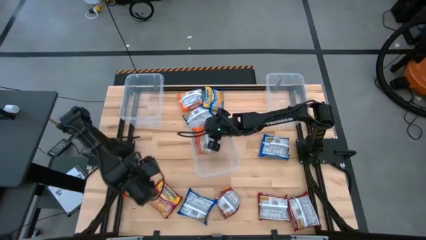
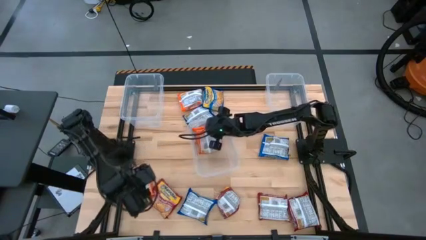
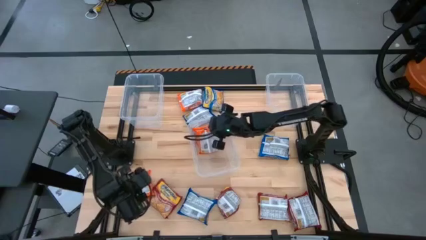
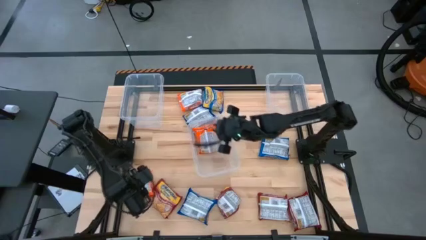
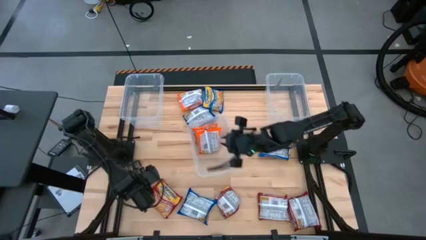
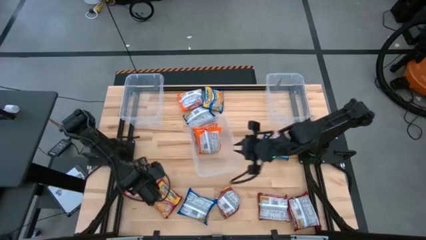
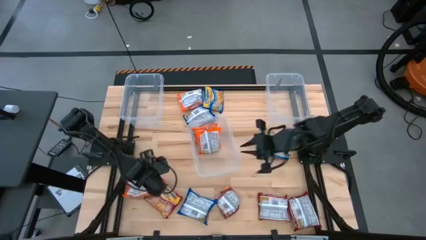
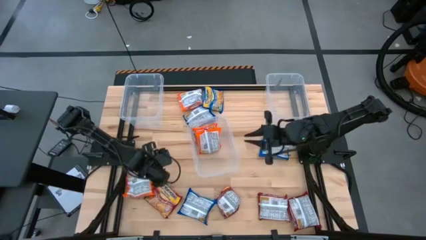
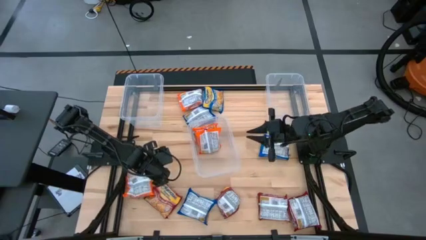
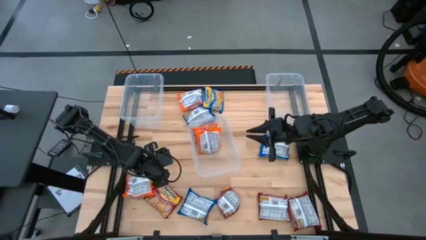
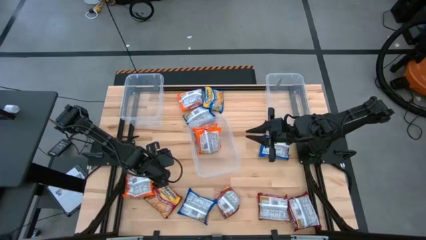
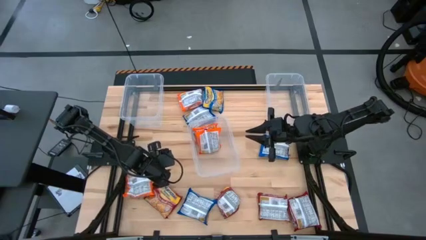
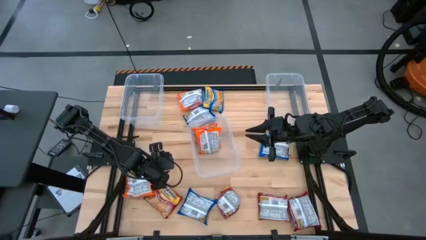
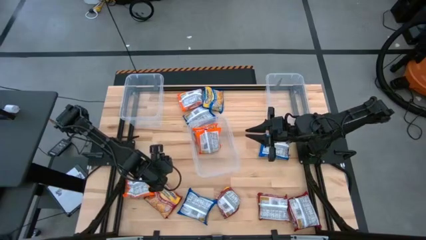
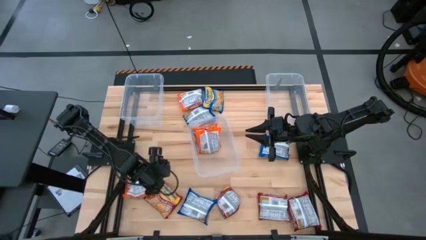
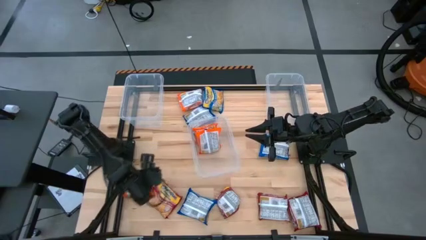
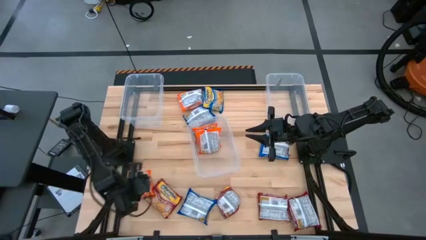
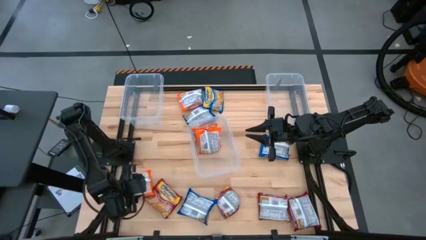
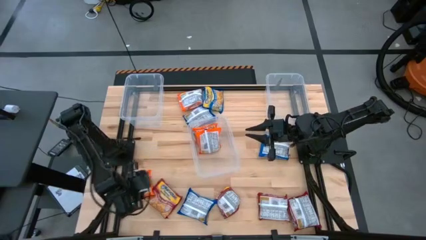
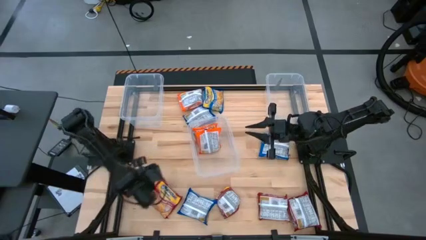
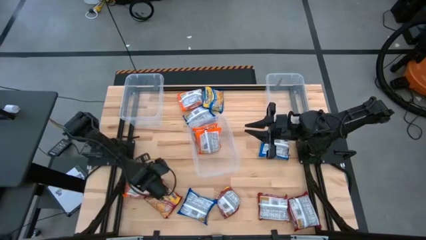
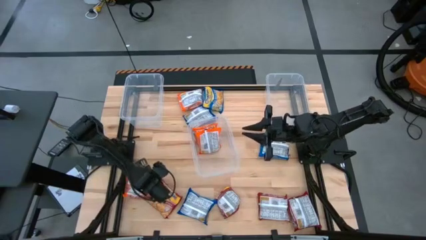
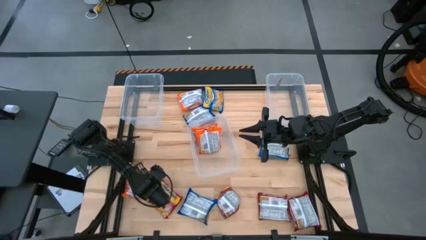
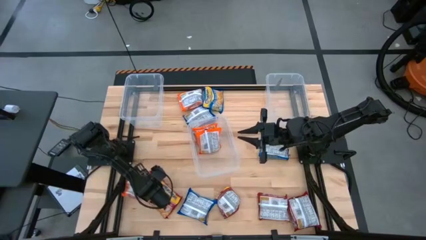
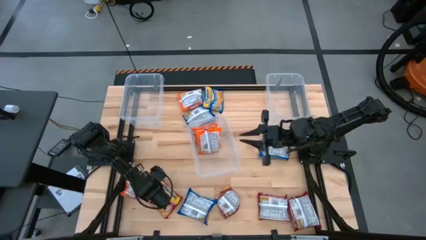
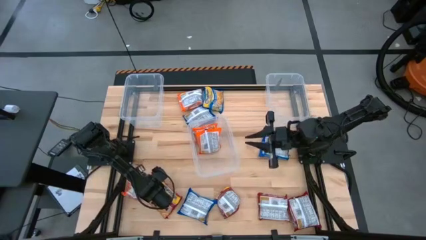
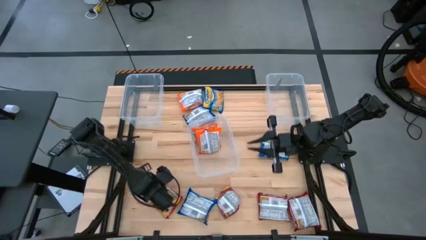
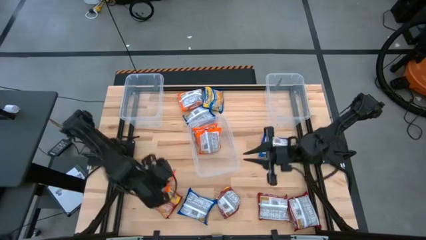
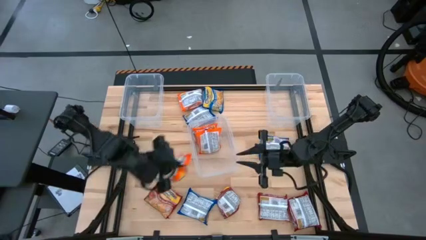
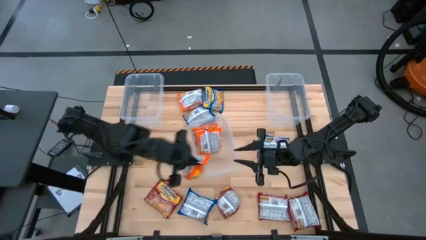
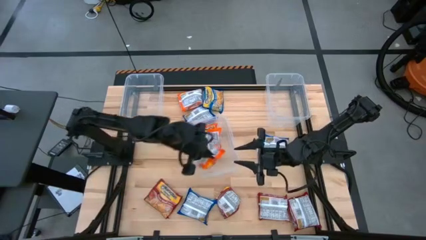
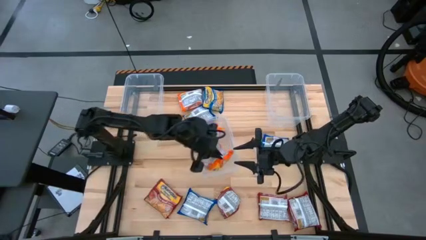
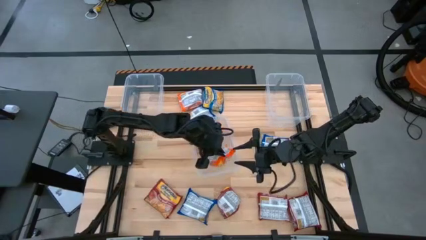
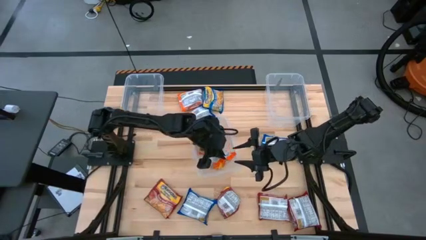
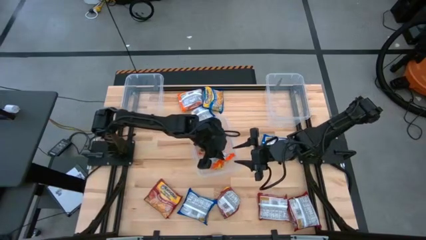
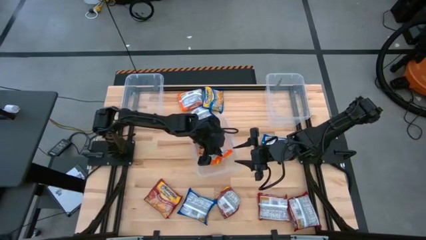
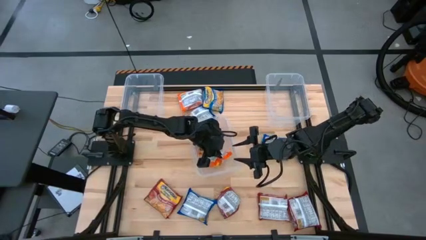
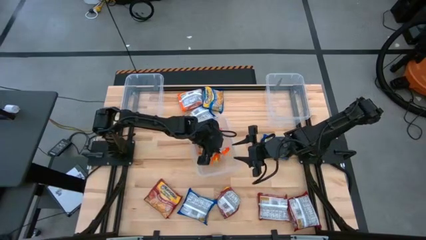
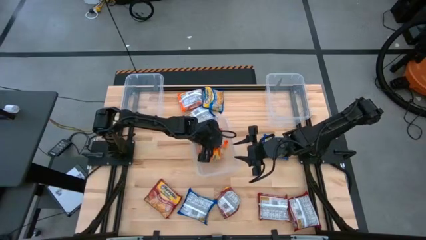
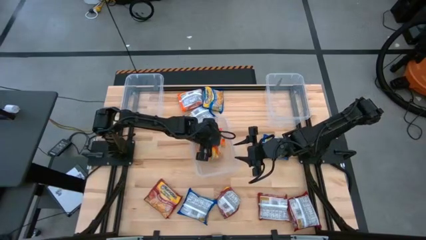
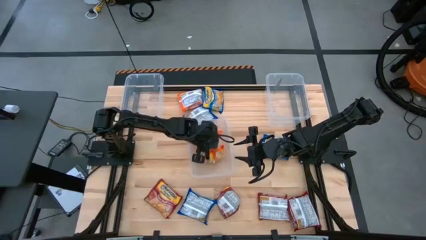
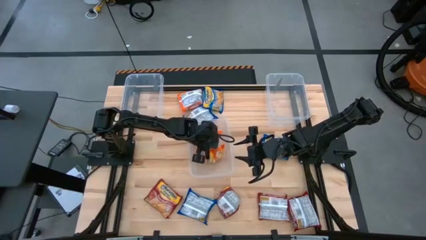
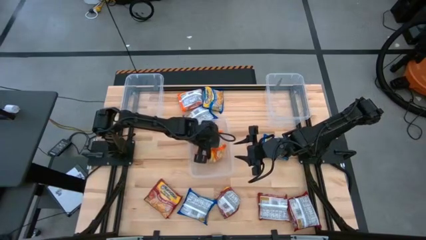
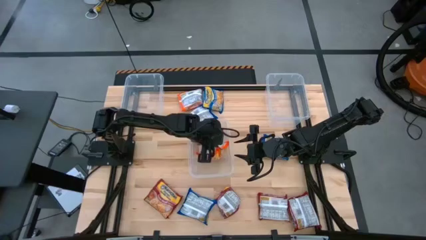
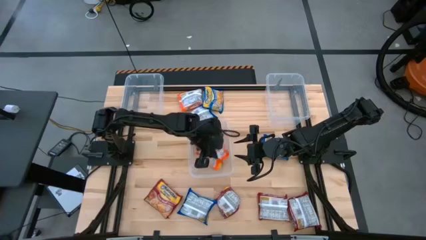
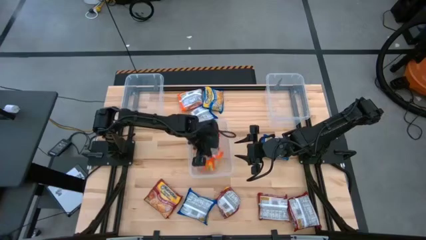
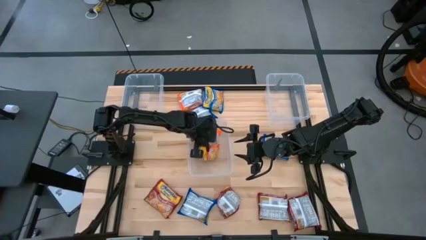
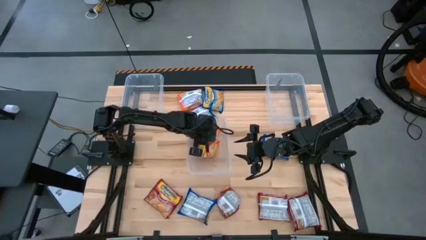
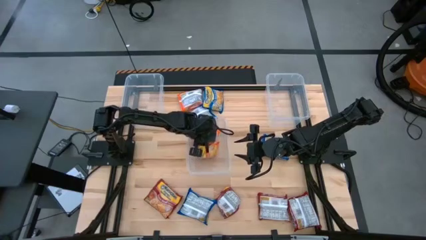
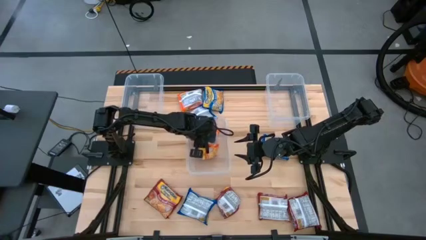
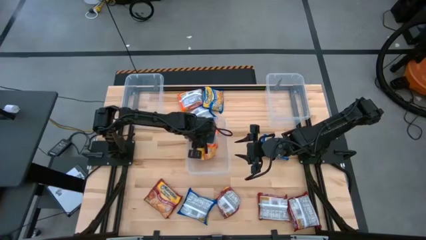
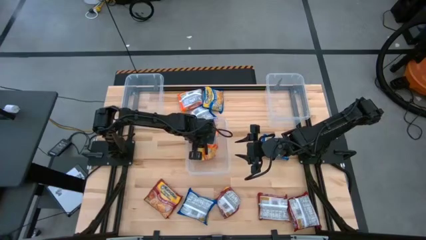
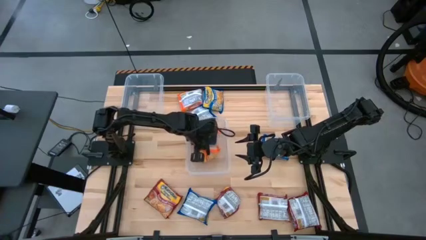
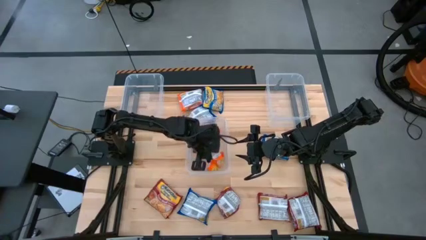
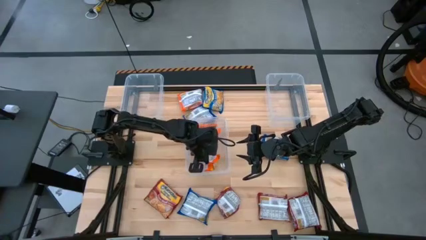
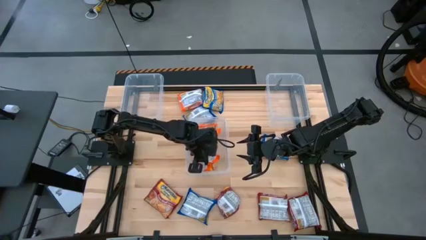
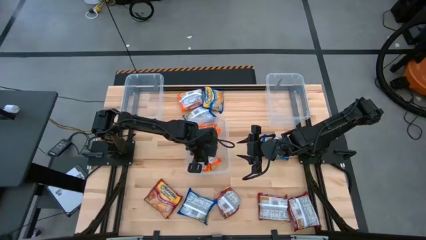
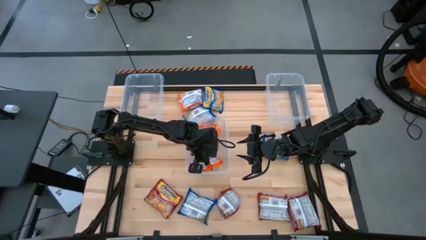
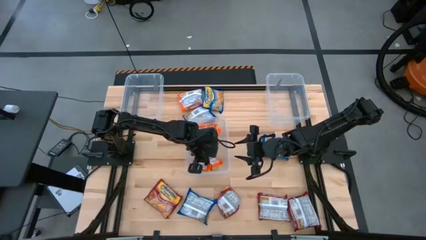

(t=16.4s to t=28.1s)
Task: Sort Maruchan noodles
Put the orange noodle pack into the middle transparent bin
